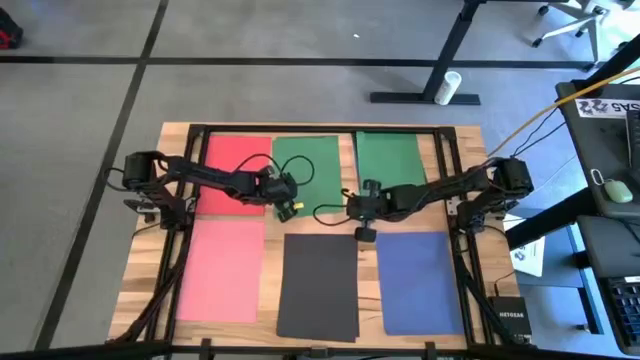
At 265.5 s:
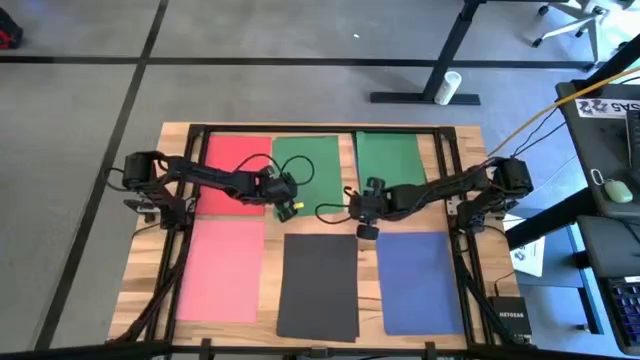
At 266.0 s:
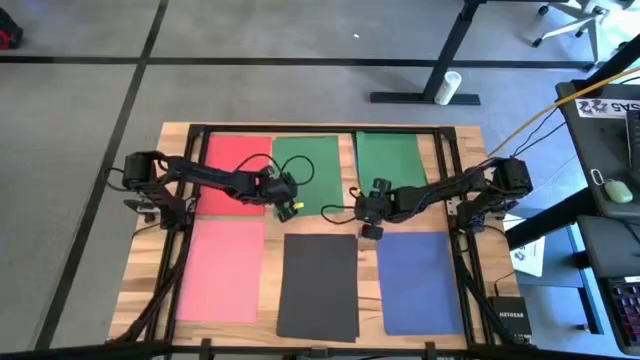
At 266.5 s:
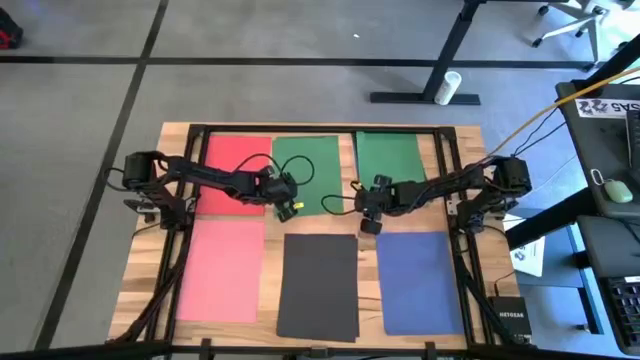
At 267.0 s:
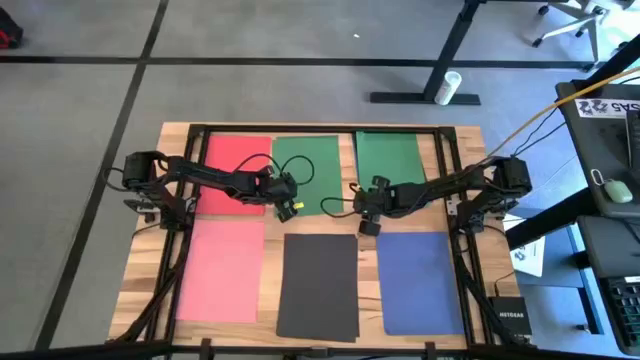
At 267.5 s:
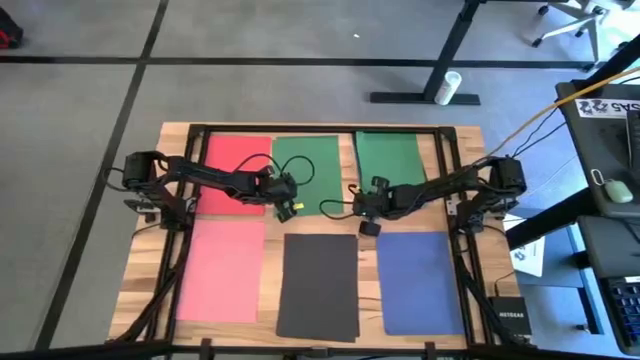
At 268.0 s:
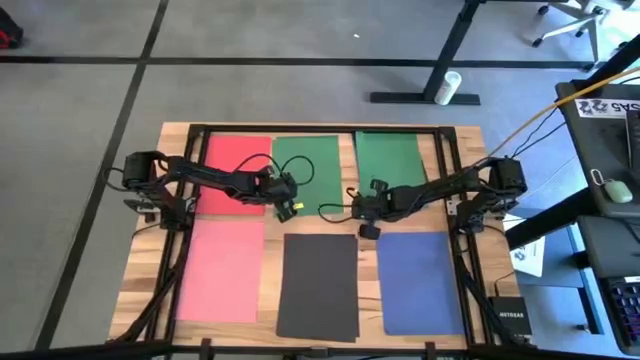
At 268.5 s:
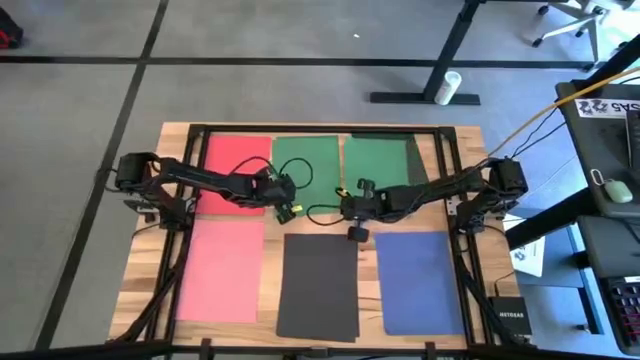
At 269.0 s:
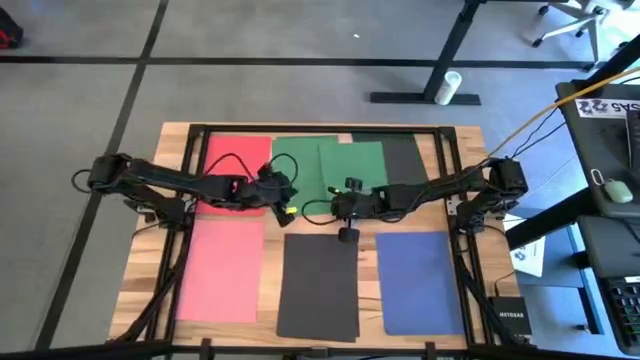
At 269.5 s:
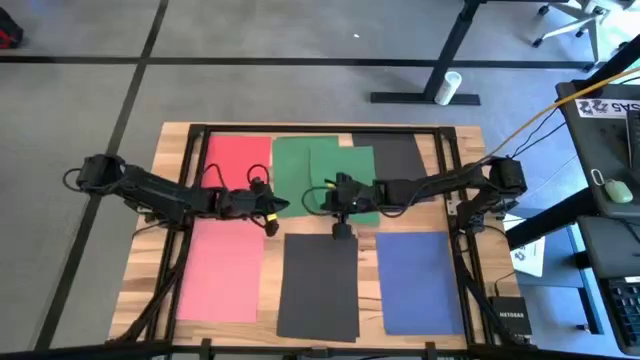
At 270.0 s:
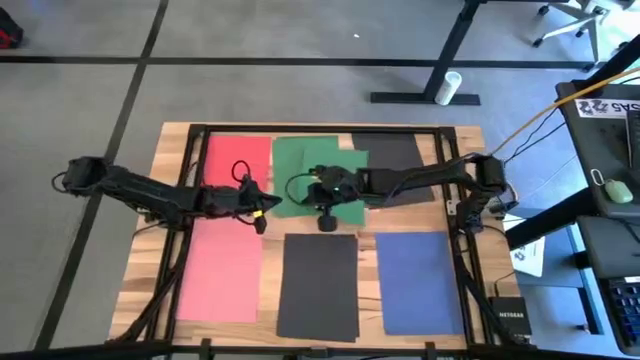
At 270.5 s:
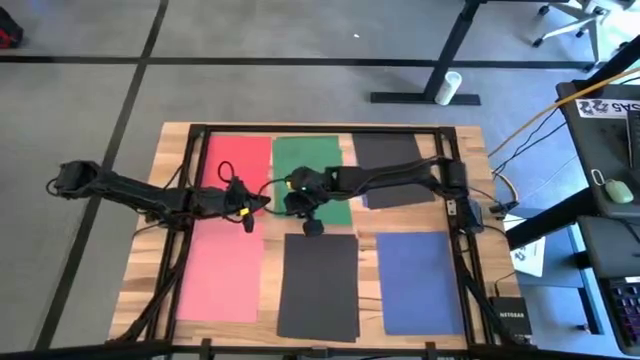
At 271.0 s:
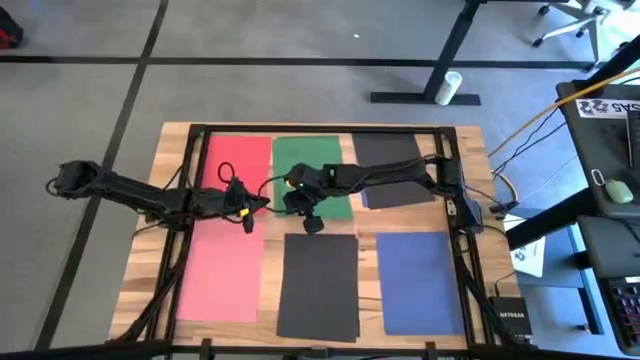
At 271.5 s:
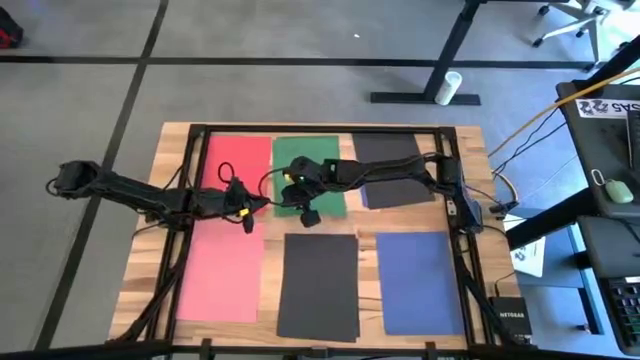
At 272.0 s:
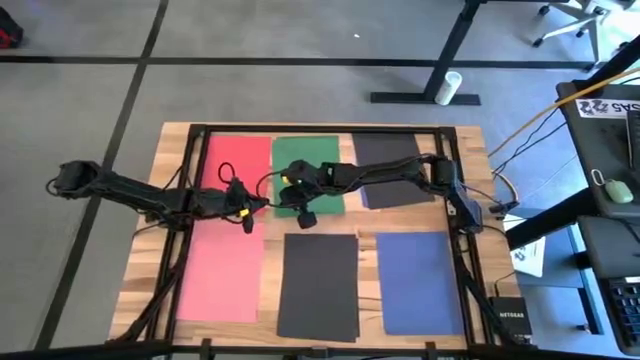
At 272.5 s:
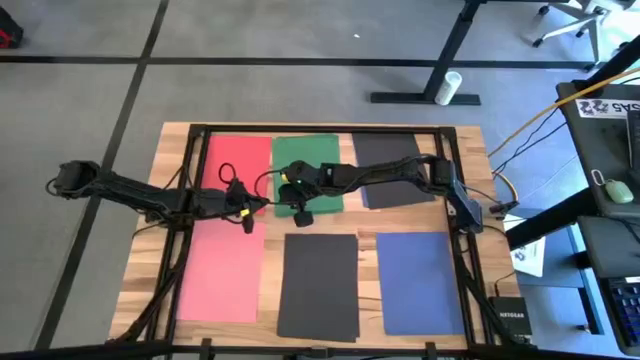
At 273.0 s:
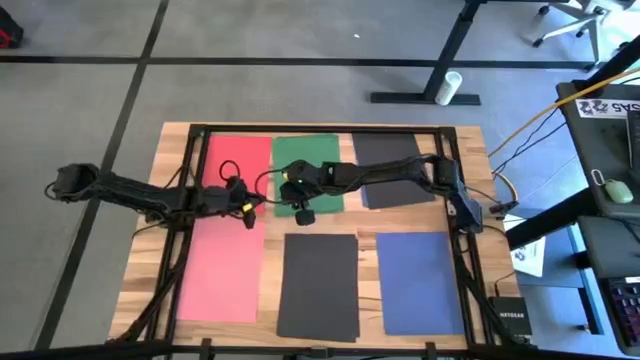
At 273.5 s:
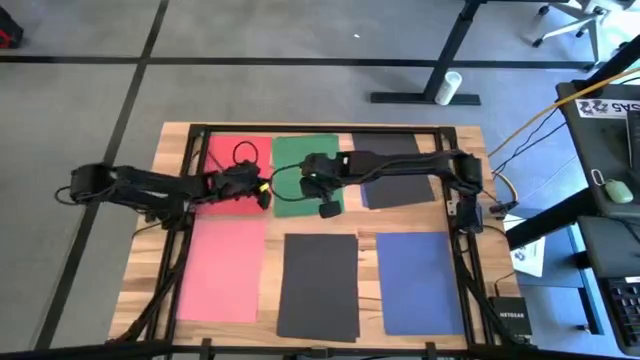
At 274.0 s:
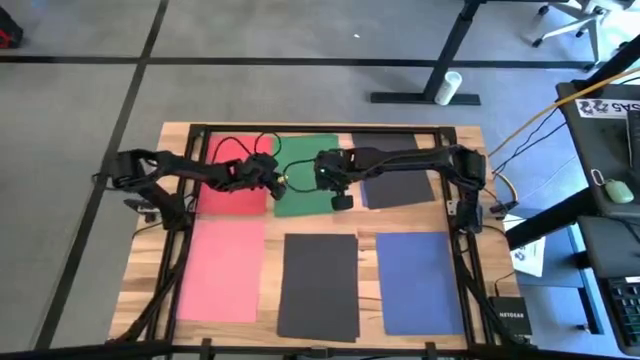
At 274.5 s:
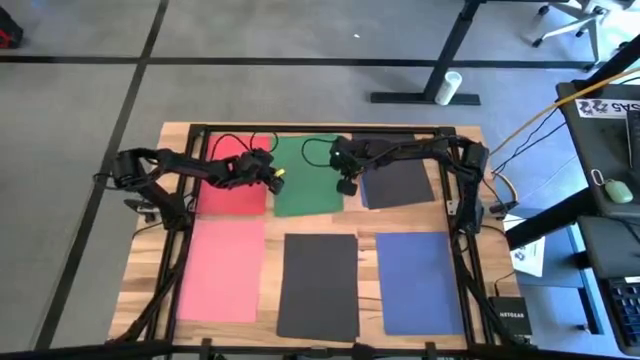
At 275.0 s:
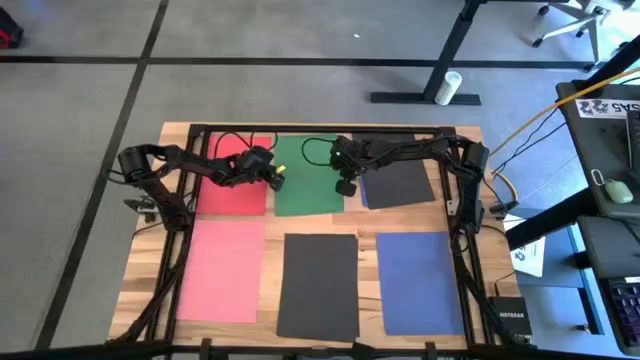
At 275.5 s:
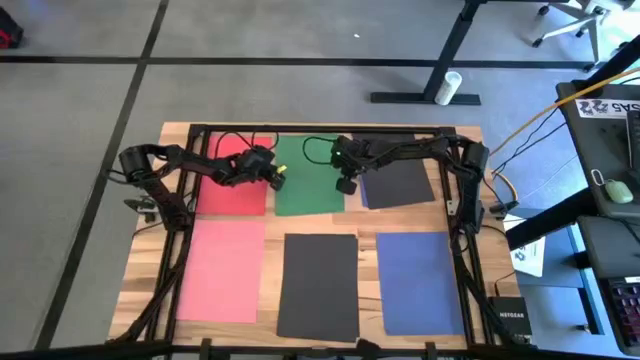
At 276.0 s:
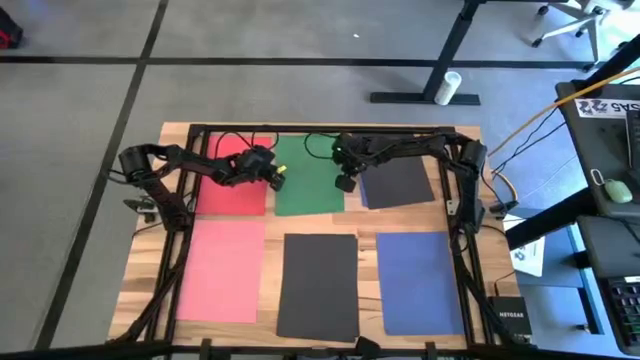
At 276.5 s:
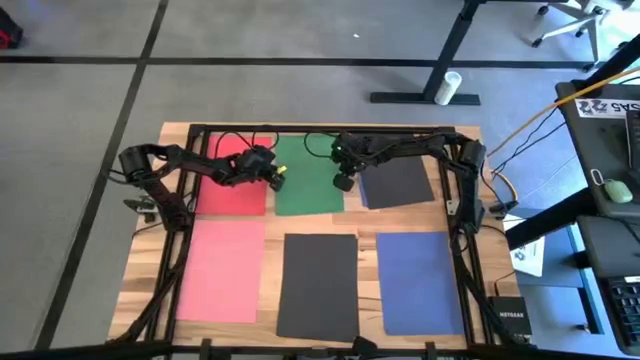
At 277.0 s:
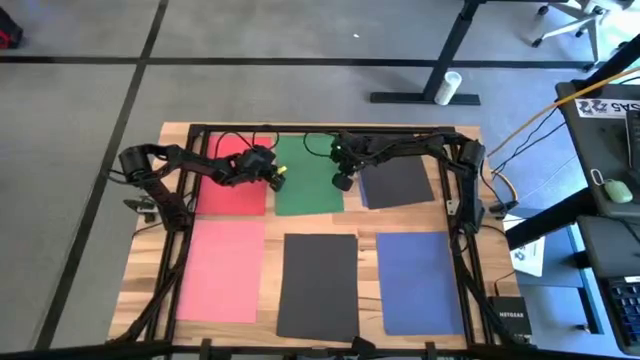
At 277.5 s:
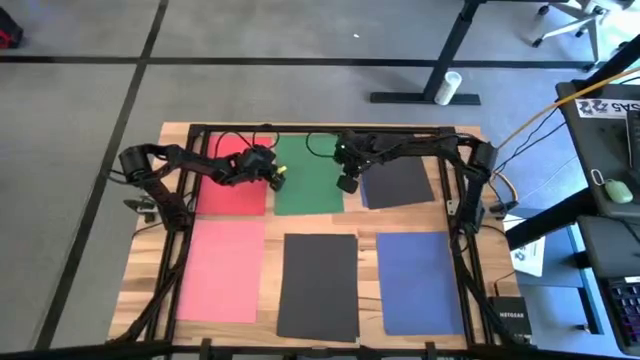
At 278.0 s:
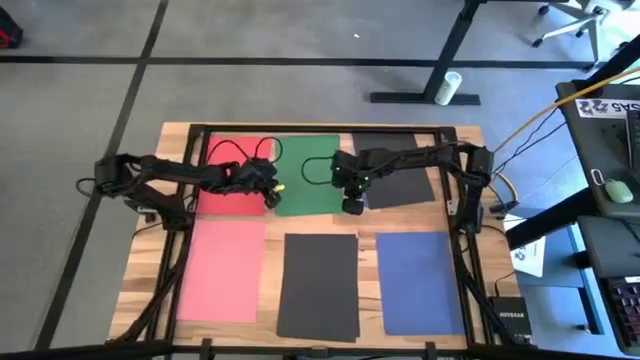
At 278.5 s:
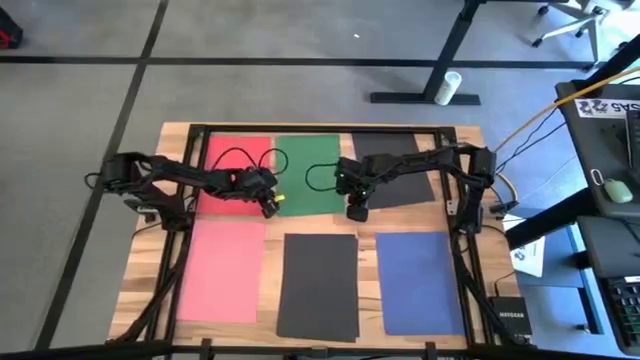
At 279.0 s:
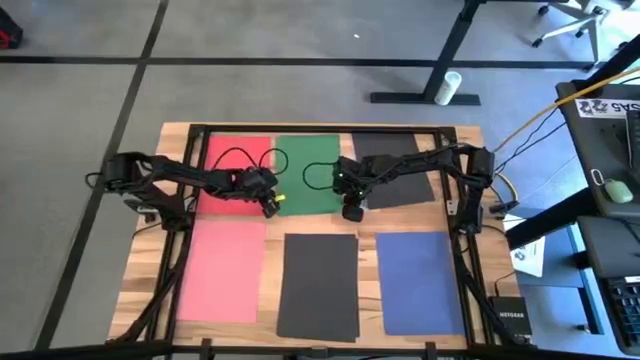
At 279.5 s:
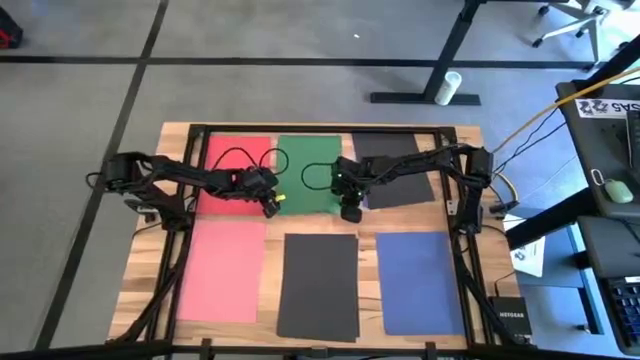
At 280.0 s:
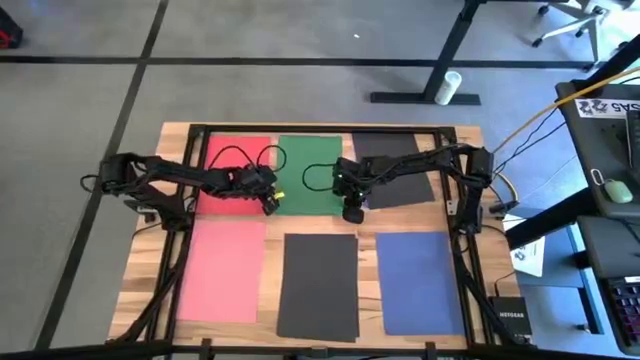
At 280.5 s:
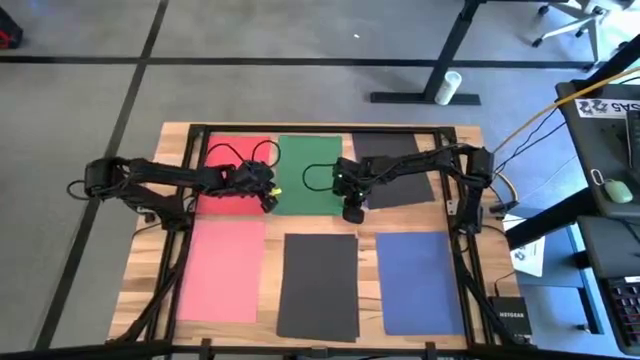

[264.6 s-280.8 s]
Task: Organize paper
Stack the green paper on top of the green papers

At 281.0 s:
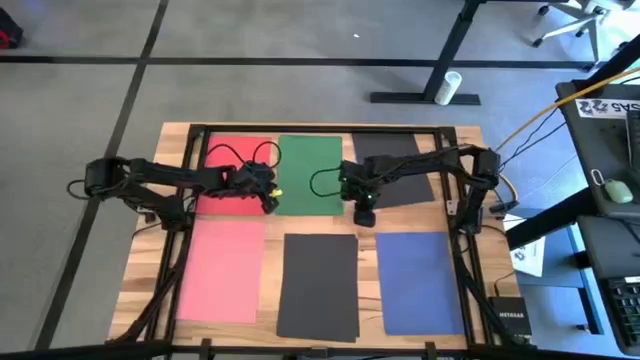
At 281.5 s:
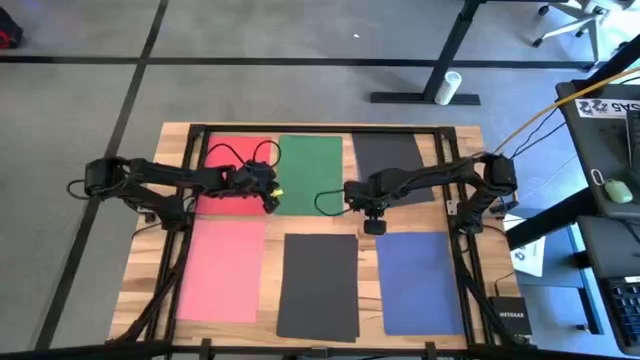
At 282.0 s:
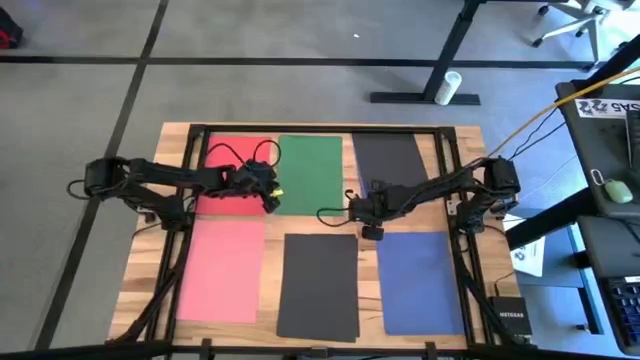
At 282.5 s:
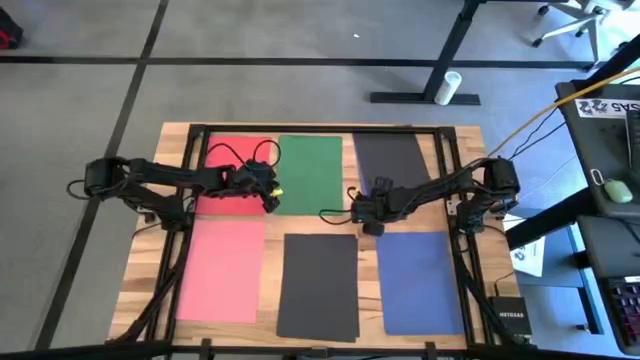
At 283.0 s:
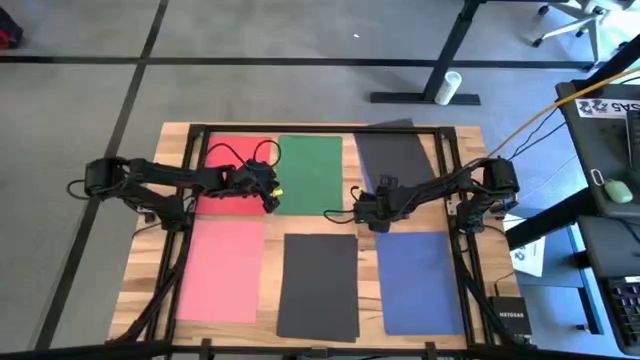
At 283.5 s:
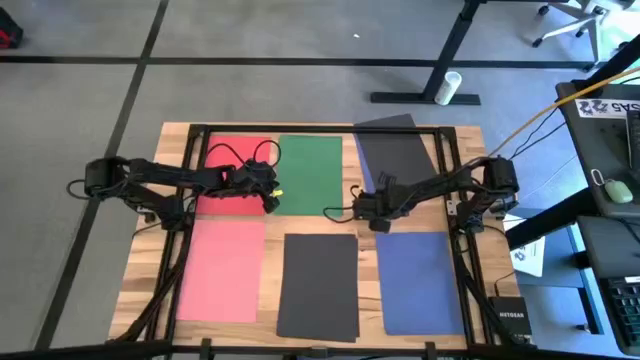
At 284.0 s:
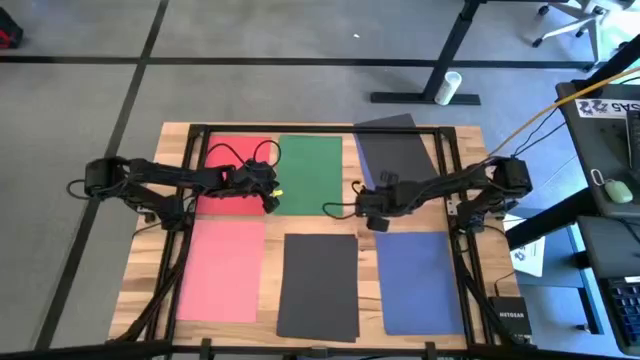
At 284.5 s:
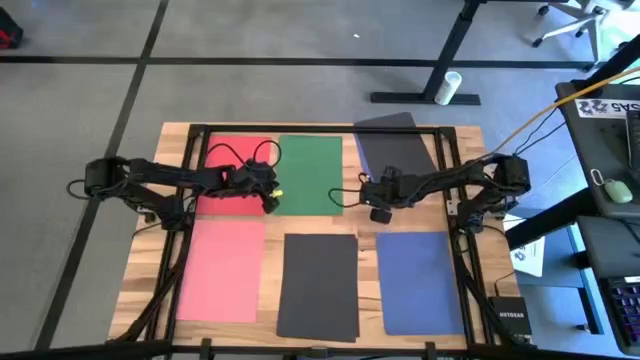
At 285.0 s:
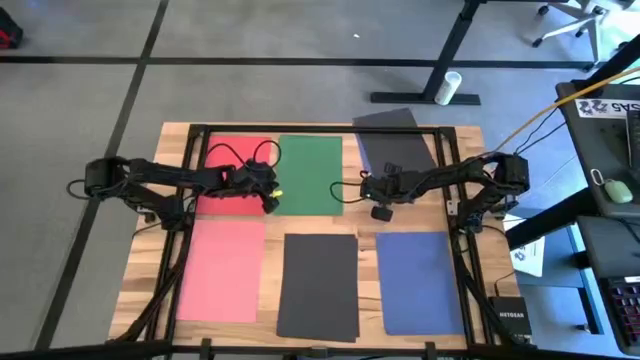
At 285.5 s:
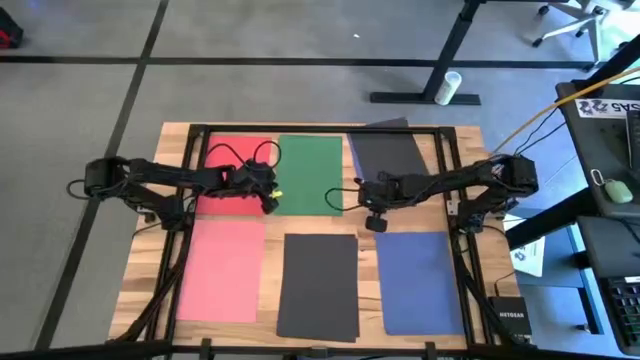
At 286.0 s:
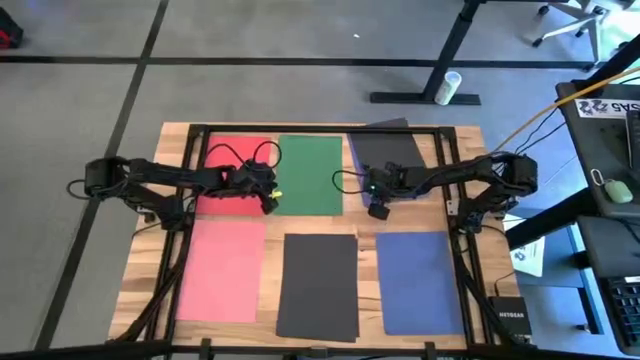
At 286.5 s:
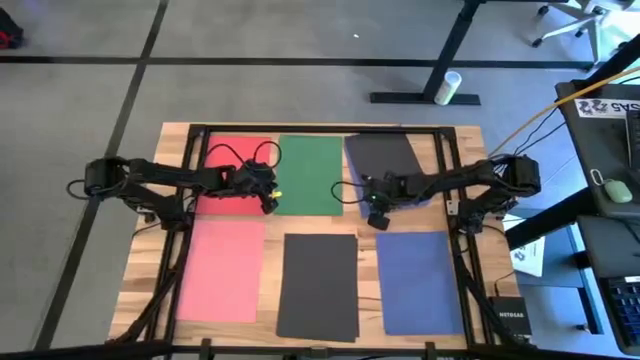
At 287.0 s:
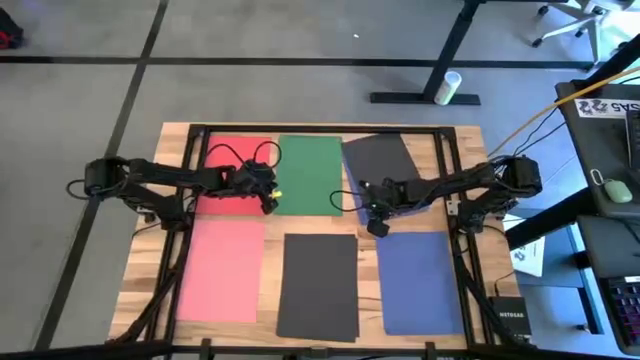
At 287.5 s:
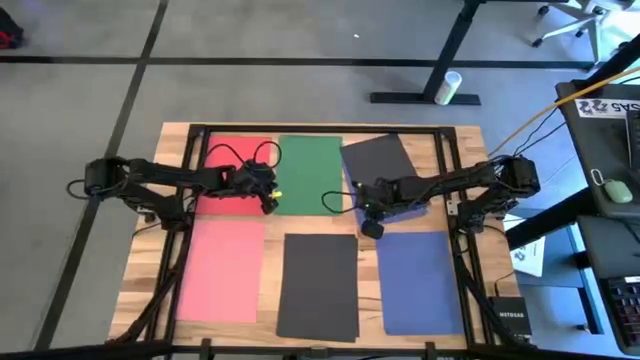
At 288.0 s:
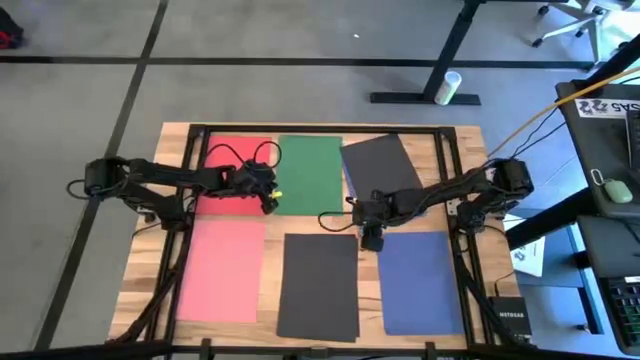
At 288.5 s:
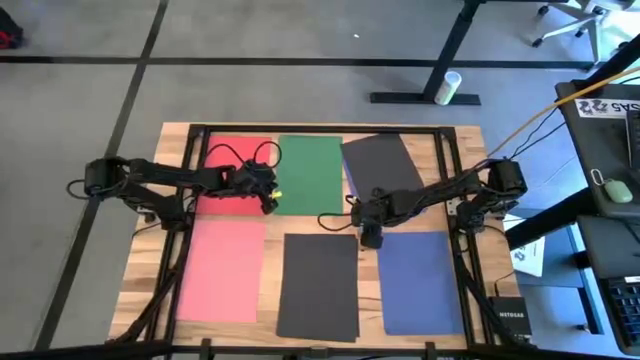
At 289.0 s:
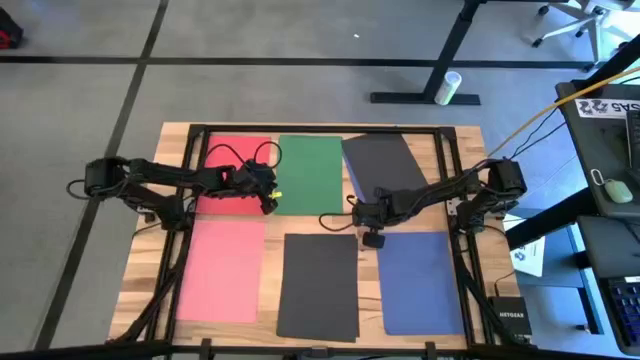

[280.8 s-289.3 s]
Stack the black paper on top of the black papers
